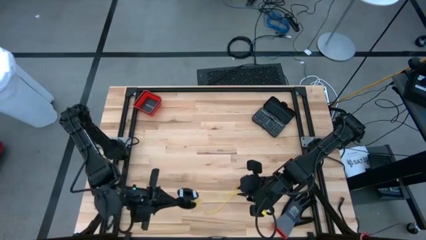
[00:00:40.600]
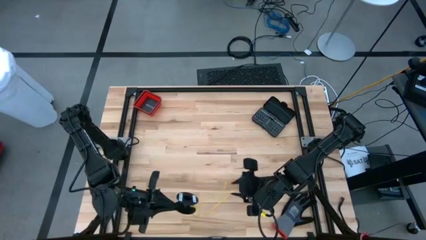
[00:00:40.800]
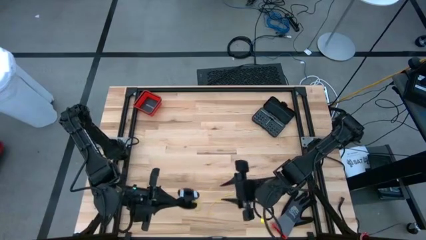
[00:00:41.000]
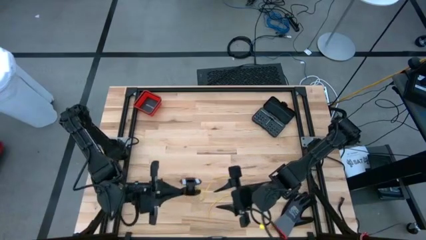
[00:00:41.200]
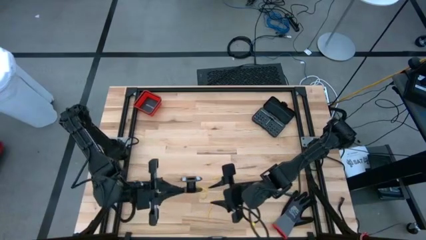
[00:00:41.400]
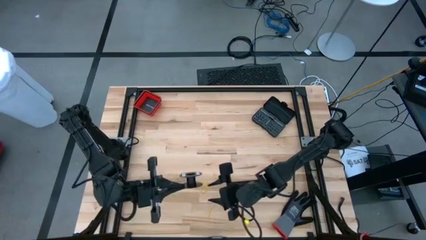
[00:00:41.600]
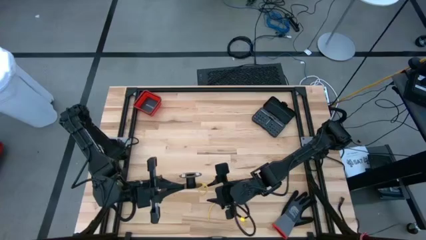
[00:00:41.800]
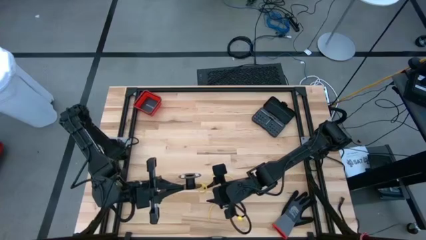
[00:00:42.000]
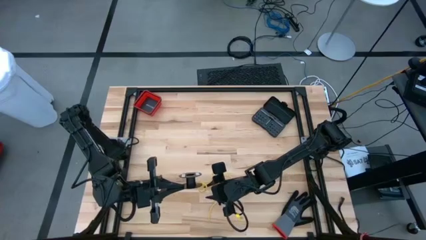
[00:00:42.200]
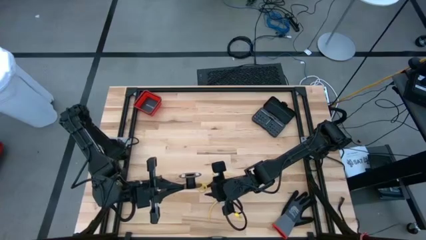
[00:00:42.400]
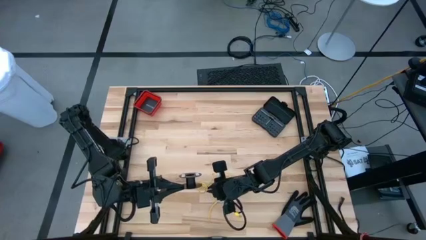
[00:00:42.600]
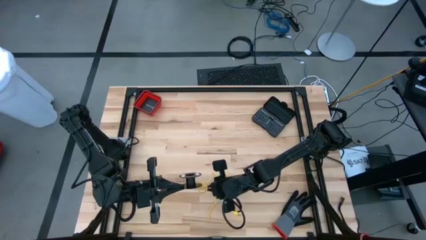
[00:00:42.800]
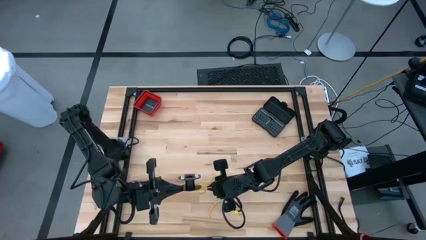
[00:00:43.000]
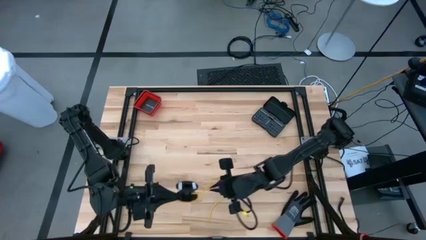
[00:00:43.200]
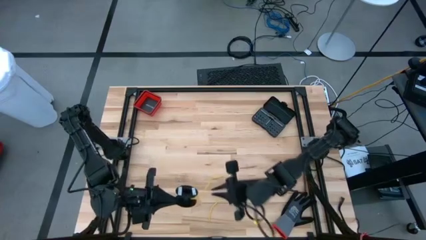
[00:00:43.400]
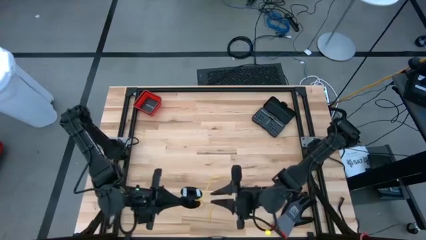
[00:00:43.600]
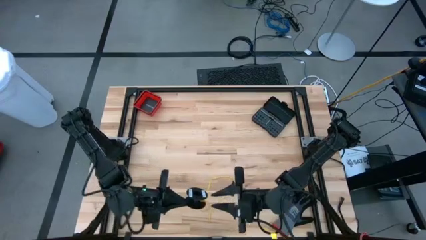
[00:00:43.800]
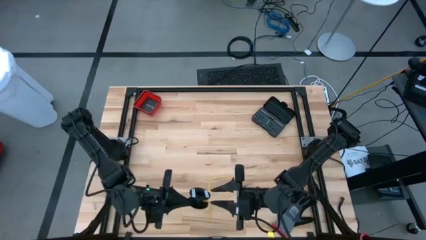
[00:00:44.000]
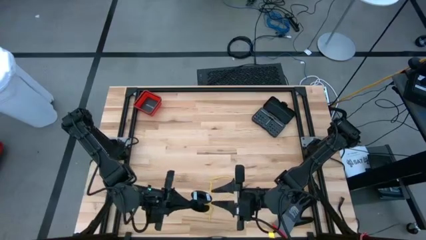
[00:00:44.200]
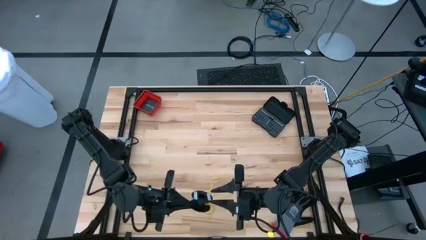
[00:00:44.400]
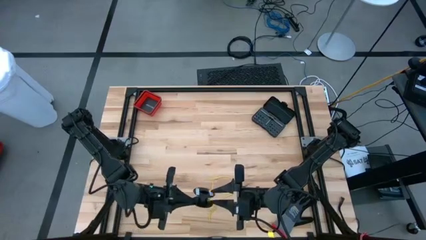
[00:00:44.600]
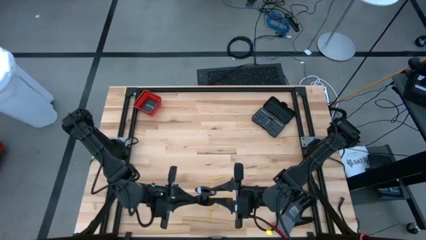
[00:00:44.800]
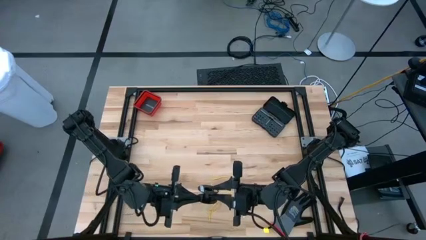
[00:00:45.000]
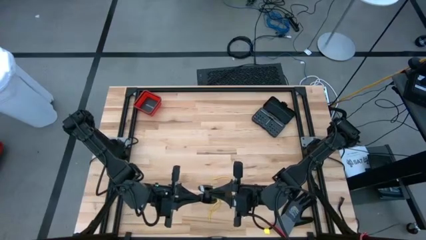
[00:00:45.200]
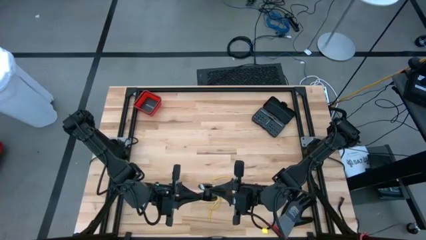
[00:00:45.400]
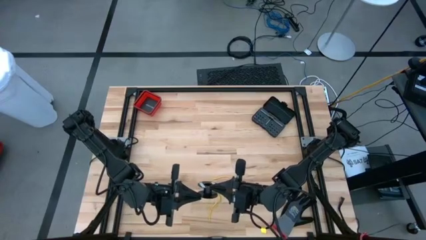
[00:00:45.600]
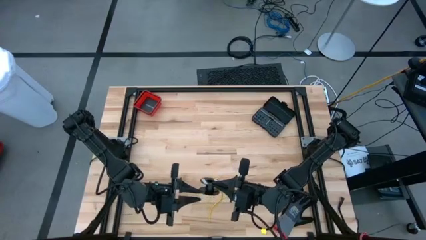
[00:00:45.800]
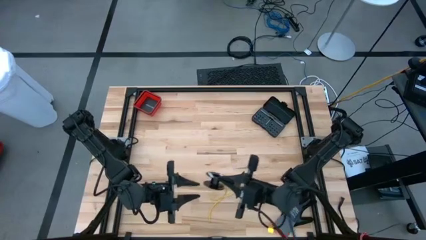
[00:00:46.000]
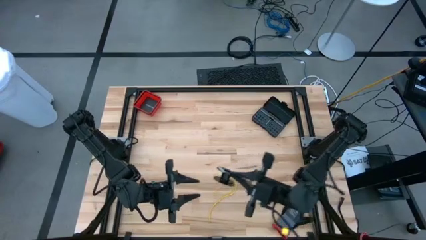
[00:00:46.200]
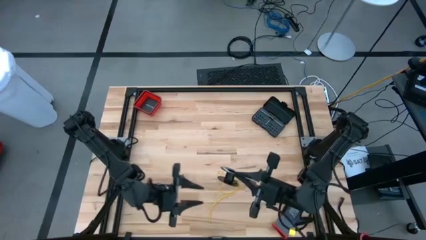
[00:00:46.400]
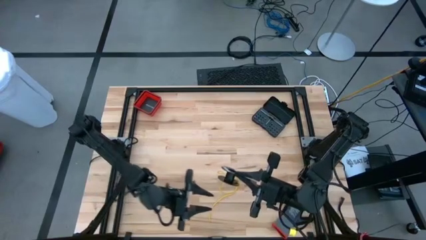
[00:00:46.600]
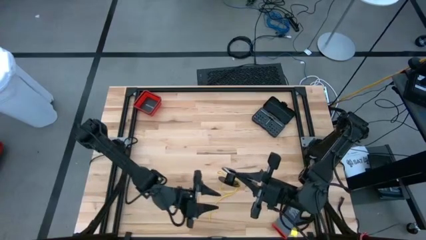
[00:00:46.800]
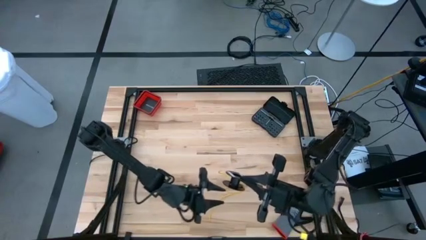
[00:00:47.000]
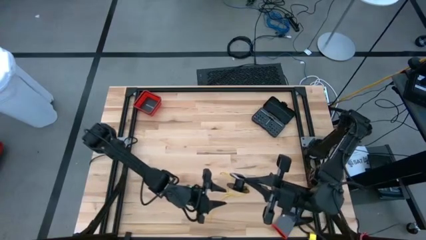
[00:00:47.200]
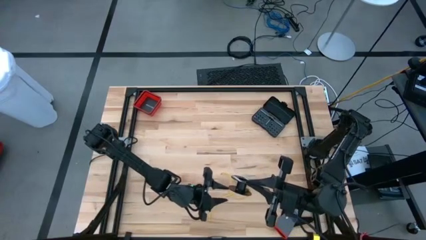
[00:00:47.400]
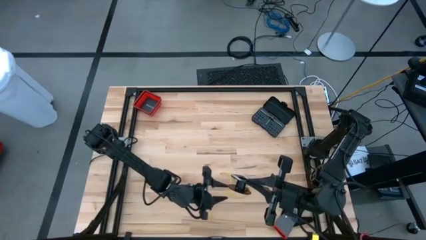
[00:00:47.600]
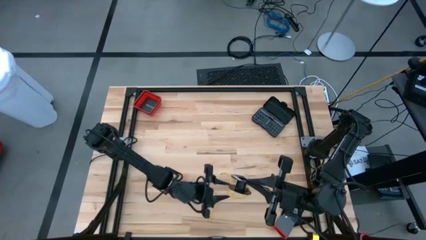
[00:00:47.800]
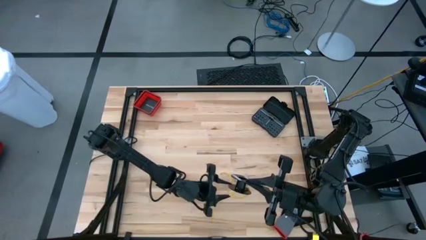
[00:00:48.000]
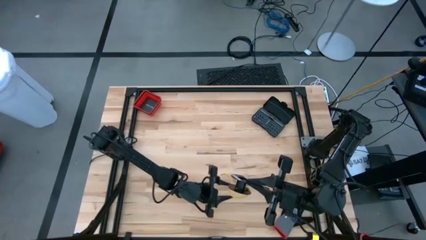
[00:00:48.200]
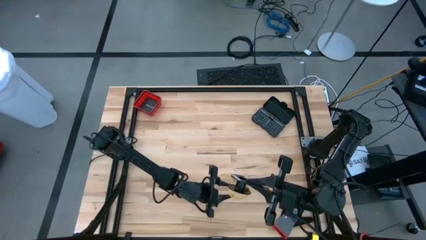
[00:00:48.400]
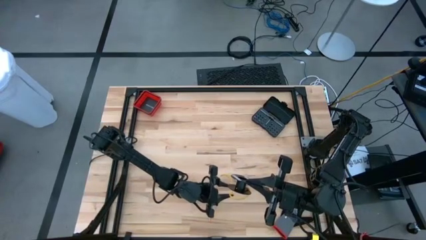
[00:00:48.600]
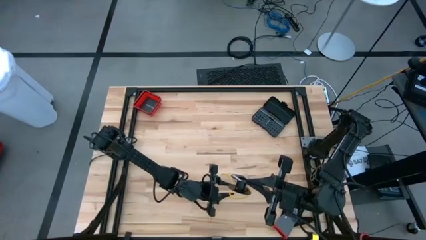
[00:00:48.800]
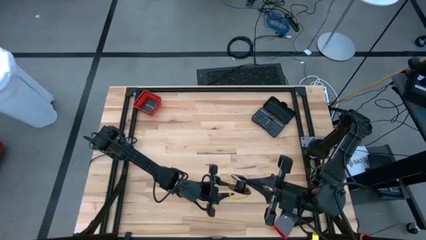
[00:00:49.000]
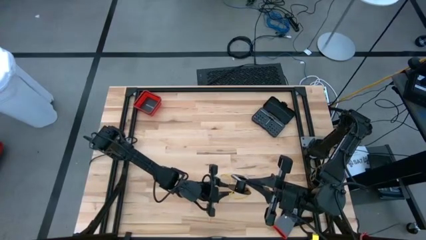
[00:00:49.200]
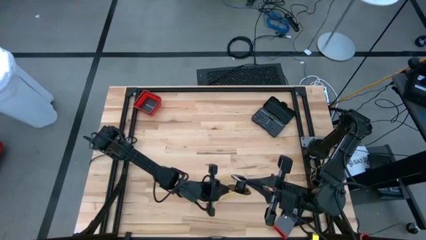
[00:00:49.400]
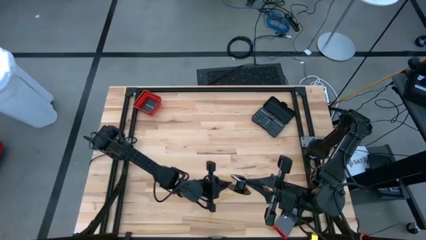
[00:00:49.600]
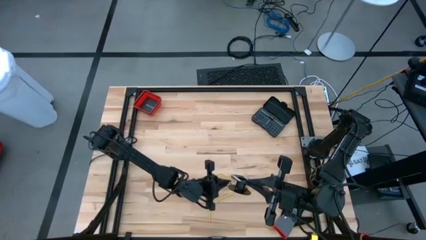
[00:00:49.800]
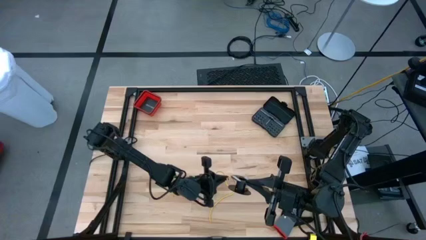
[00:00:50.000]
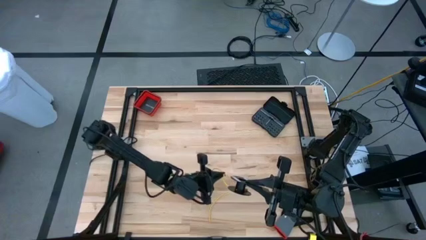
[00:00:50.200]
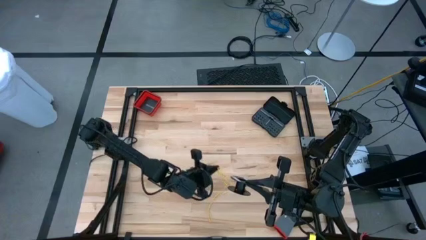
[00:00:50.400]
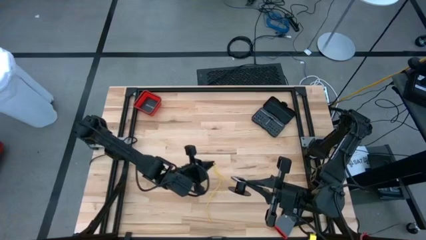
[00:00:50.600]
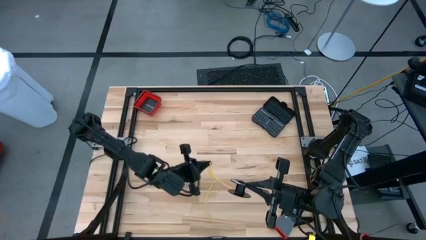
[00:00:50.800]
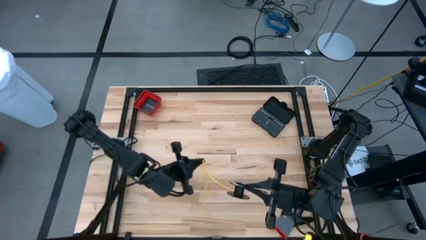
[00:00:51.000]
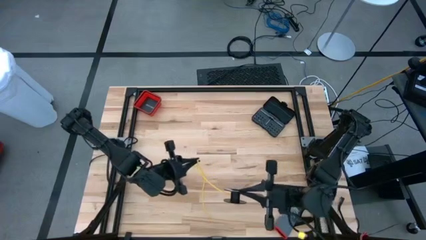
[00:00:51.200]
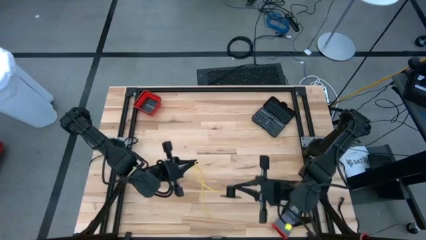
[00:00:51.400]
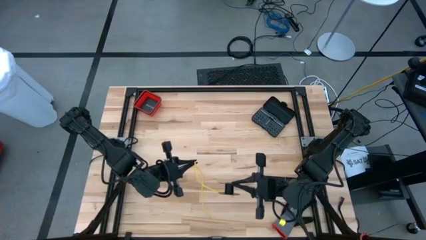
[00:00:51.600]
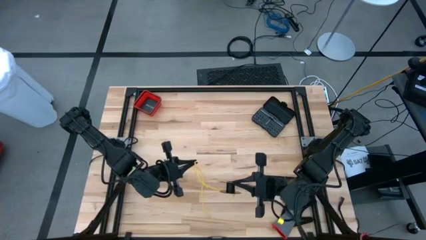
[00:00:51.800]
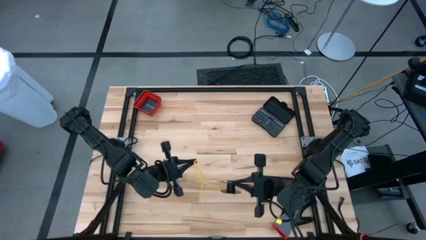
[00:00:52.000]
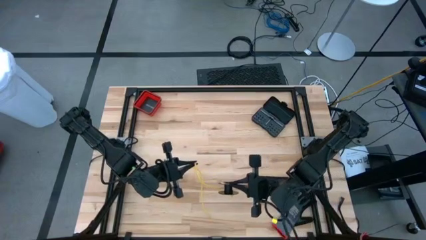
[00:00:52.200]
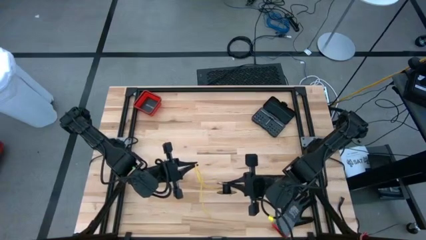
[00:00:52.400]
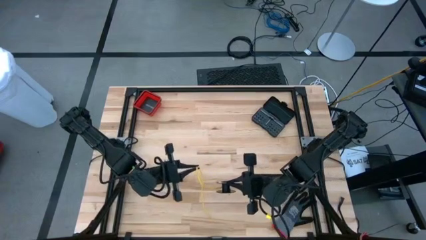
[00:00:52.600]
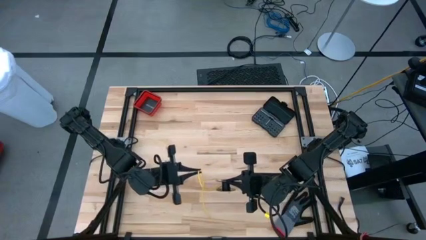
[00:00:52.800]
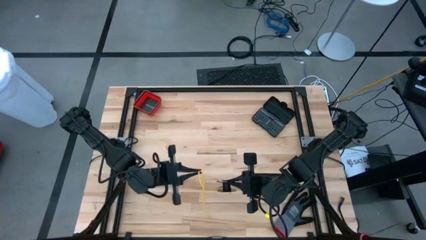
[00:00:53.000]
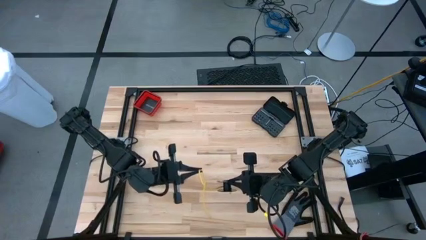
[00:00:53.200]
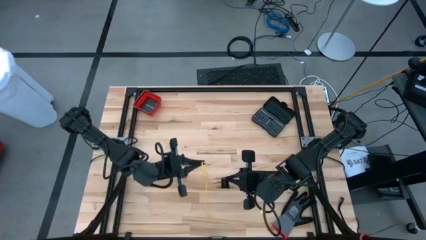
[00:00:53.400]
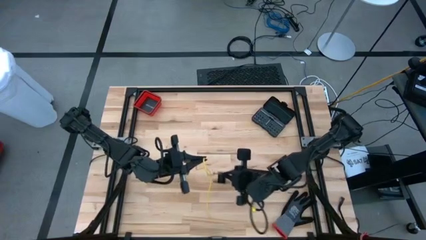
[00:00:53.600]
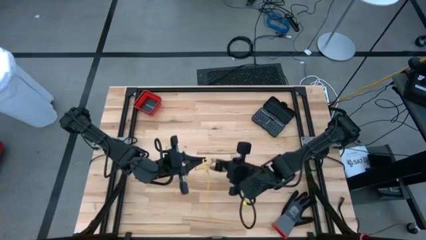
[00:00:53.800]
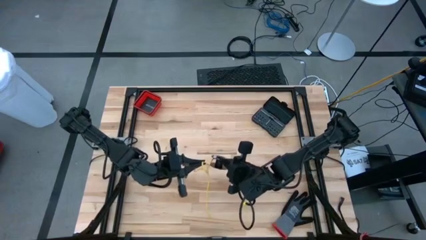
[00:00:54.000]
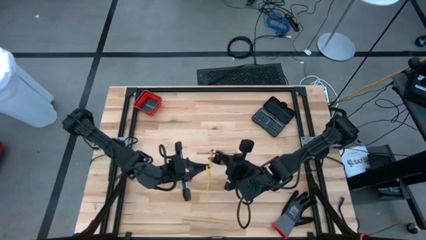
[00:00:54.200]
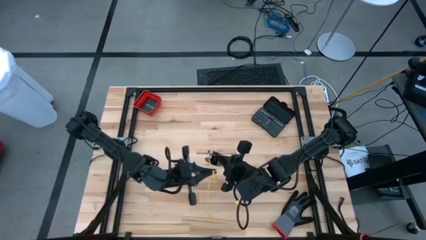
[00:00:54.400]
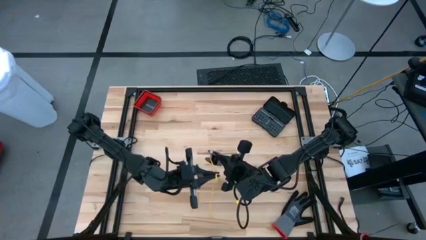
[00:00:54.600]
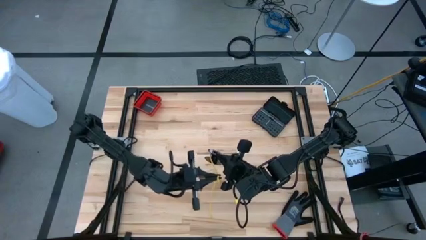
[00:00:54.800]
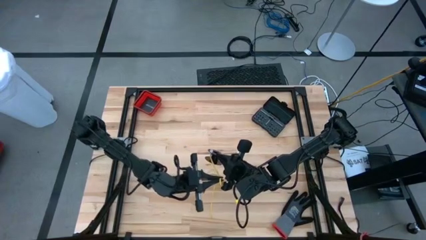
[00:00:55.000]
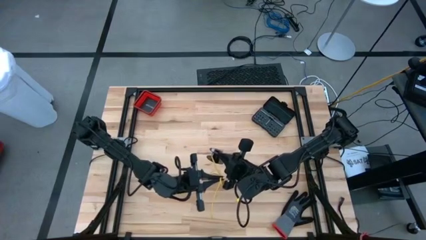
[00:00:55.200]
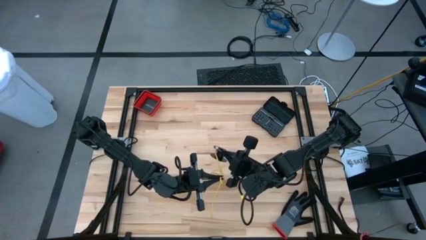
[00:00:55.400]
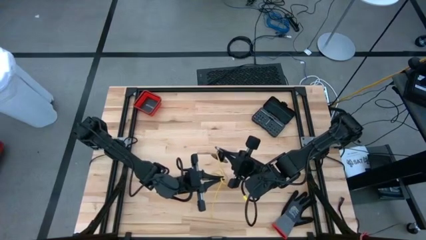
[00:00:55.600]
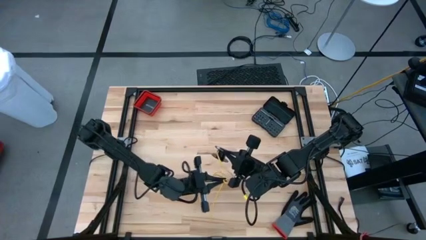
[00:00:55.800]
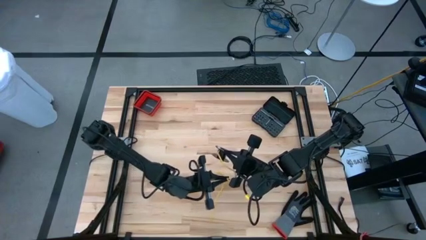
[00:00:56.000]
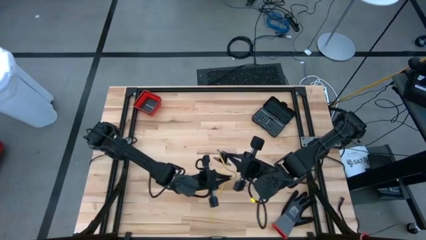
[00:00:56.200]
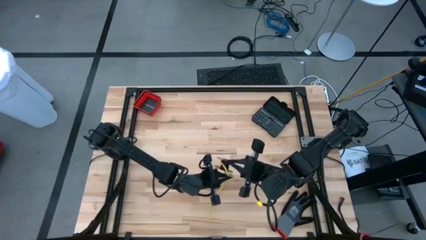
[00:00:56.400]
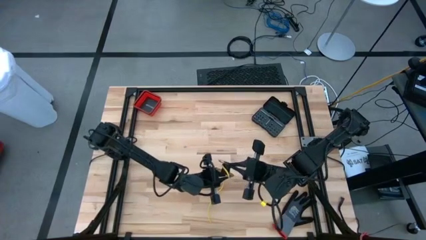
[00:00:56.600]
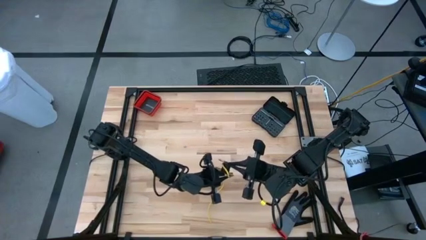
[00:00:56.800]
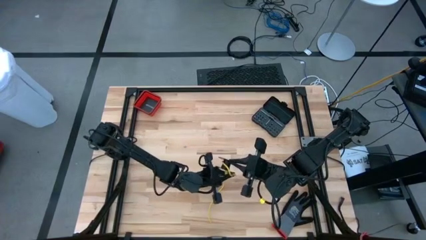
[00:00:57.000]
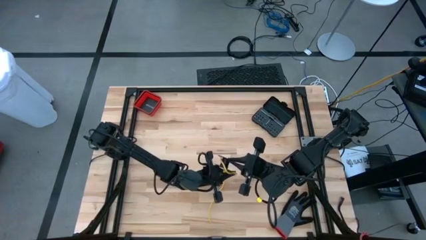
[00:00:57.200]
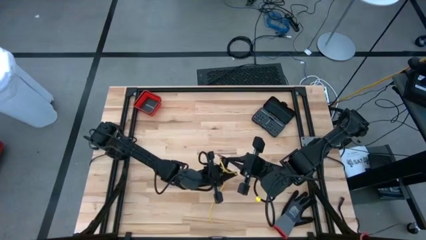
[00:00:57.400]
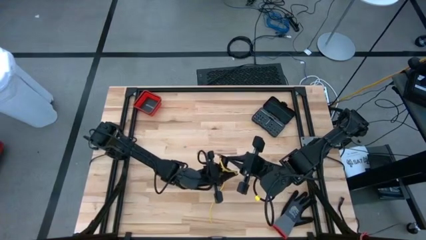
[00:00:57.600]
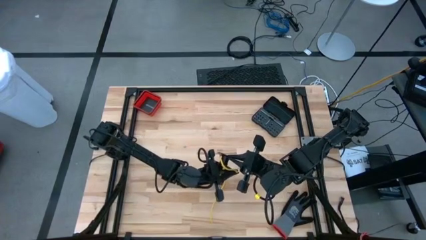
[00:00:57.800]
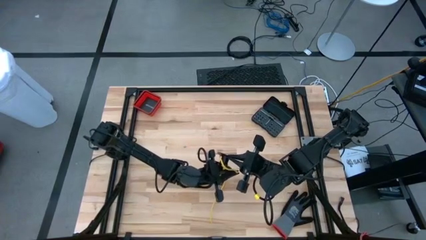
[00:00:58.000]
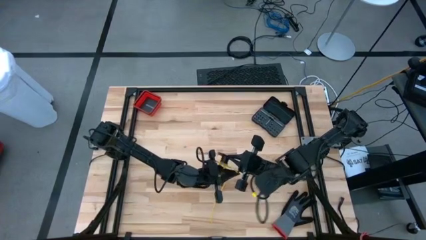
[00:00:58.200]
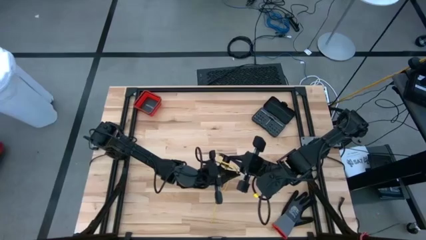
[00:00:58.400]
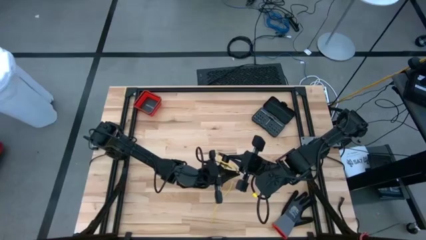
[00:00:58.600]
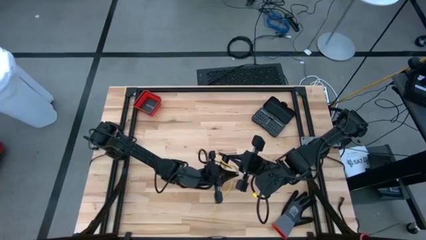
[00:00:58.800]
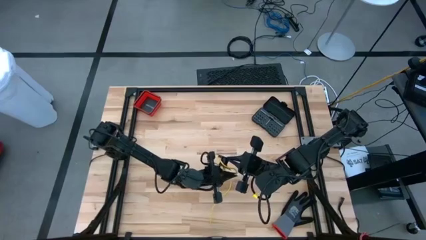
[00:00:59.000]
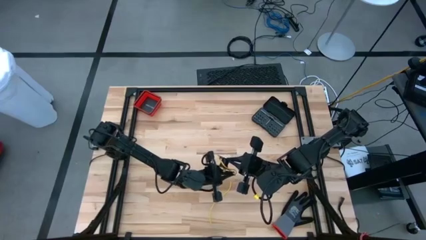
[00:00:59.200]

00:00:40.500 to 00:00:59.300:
Task: Coil cords
Coil the yellow cable wire onto the spool
